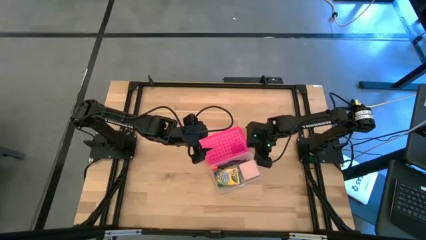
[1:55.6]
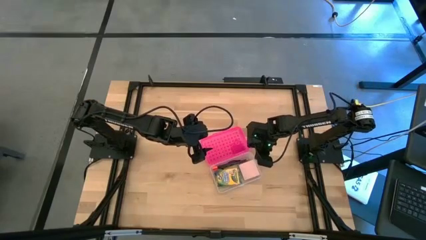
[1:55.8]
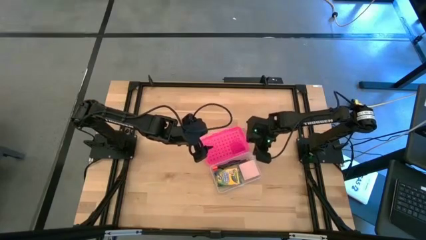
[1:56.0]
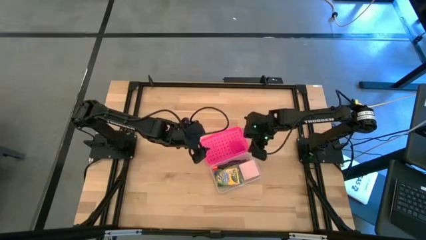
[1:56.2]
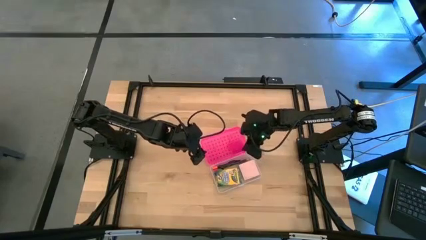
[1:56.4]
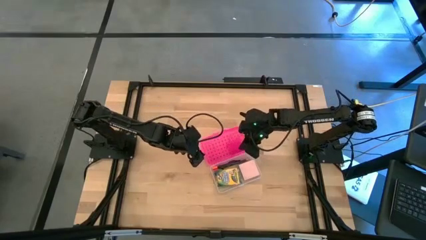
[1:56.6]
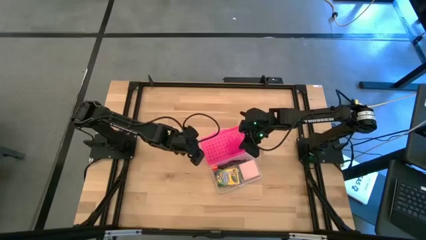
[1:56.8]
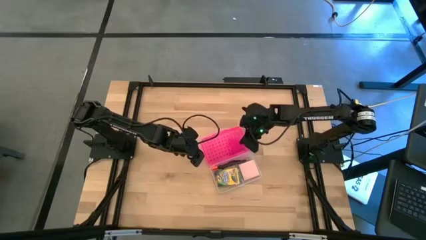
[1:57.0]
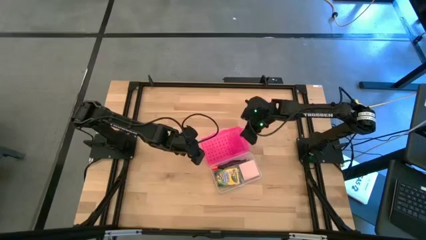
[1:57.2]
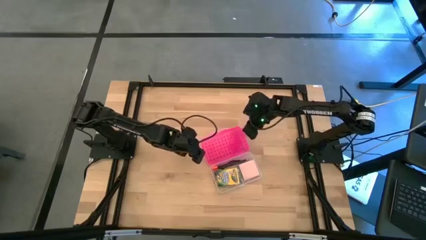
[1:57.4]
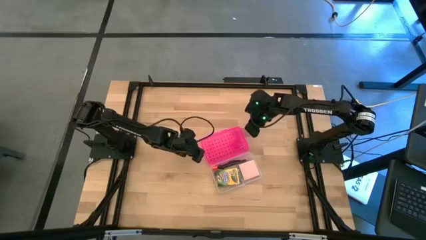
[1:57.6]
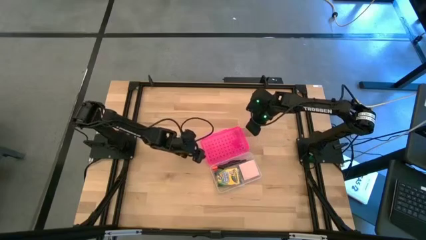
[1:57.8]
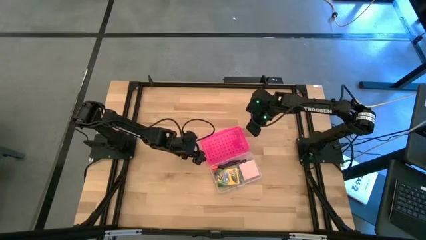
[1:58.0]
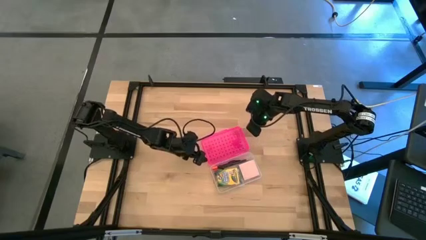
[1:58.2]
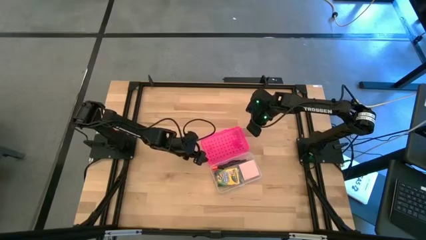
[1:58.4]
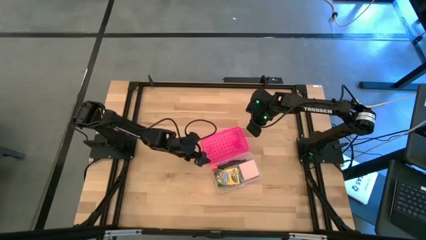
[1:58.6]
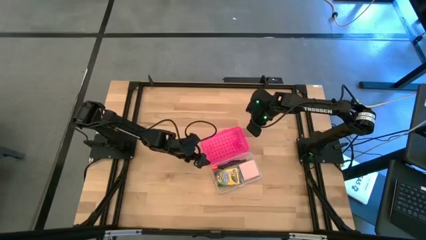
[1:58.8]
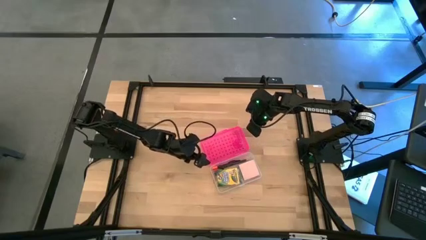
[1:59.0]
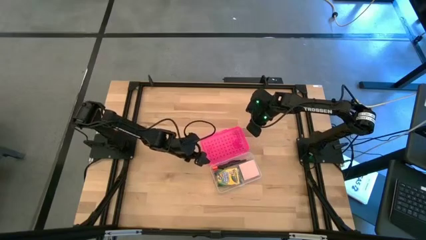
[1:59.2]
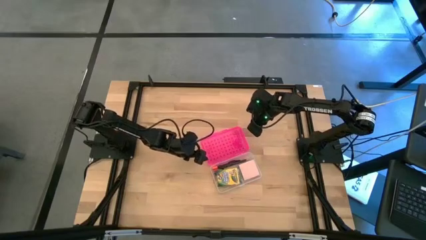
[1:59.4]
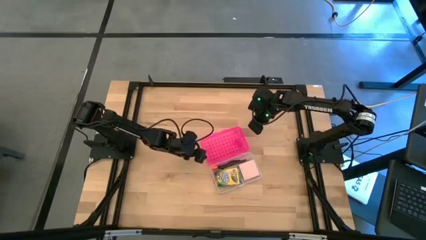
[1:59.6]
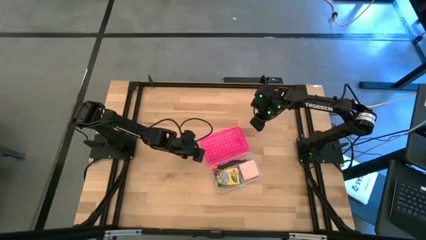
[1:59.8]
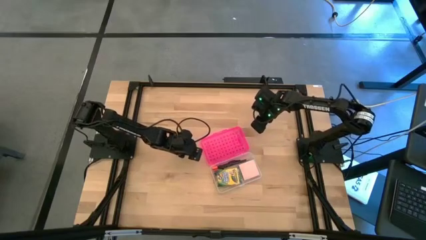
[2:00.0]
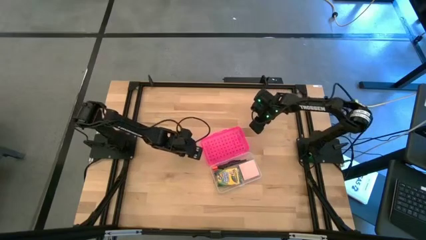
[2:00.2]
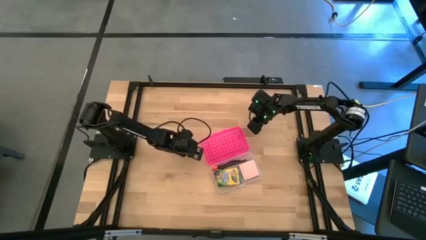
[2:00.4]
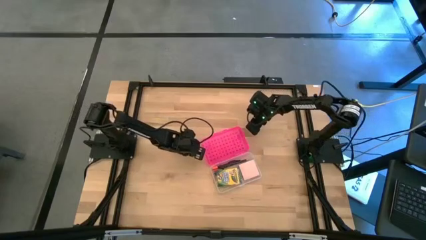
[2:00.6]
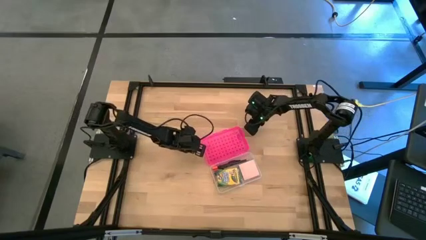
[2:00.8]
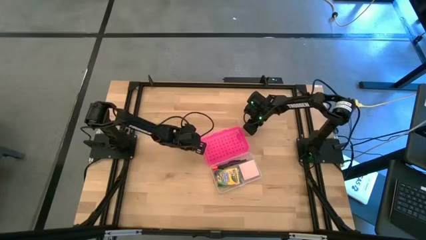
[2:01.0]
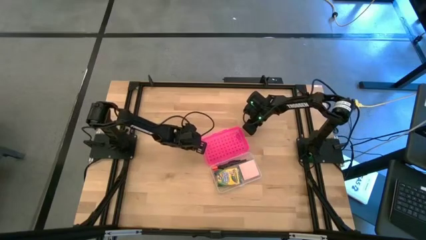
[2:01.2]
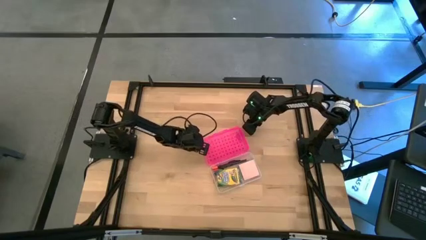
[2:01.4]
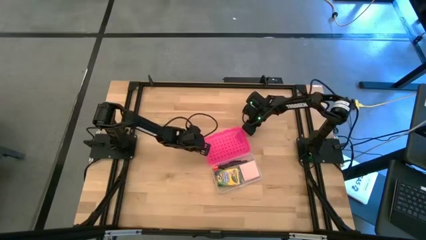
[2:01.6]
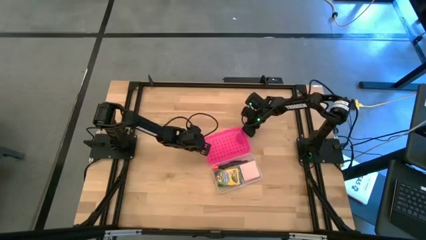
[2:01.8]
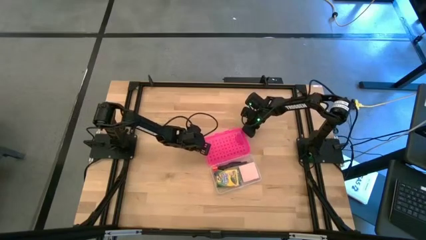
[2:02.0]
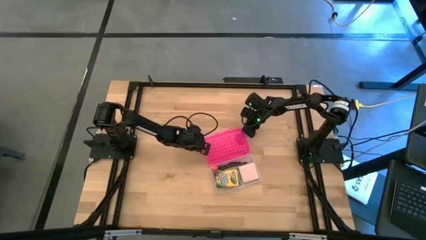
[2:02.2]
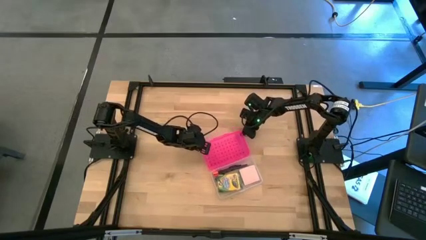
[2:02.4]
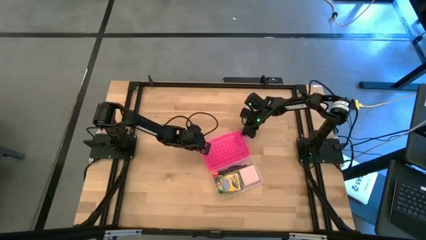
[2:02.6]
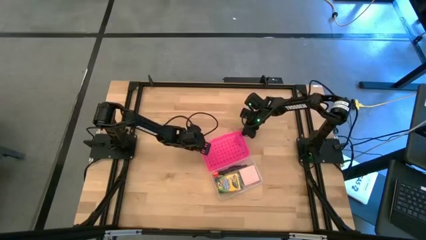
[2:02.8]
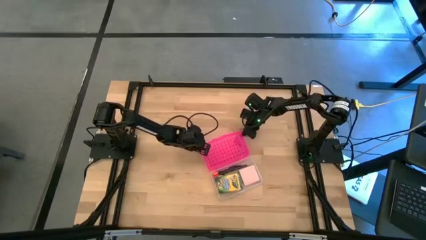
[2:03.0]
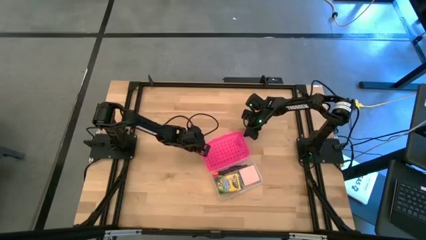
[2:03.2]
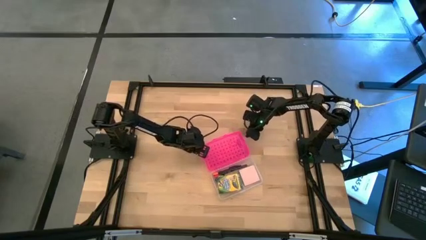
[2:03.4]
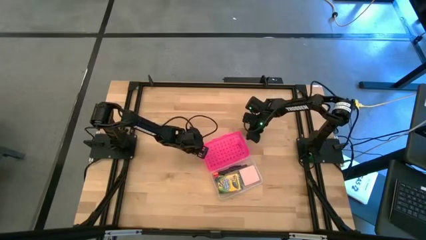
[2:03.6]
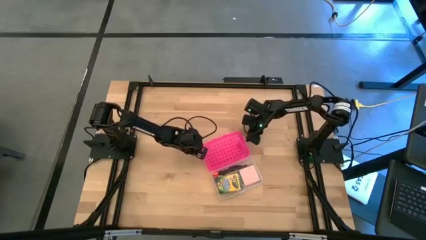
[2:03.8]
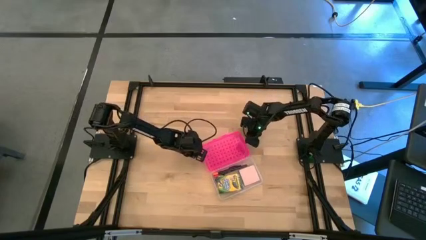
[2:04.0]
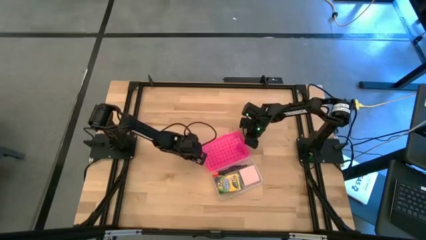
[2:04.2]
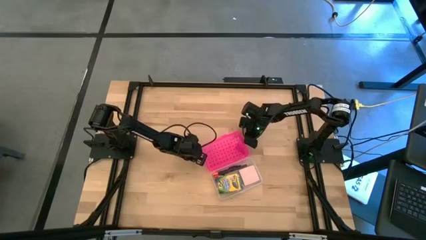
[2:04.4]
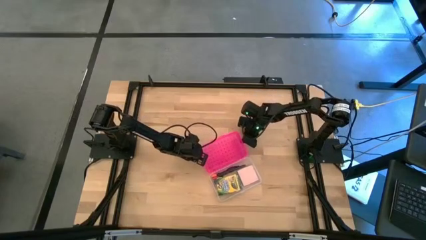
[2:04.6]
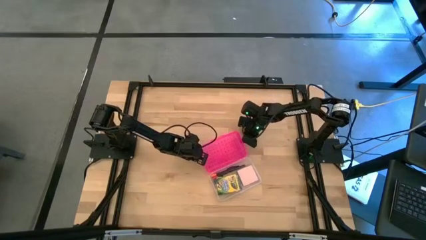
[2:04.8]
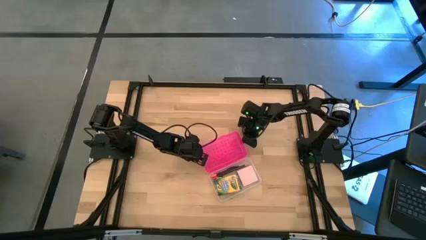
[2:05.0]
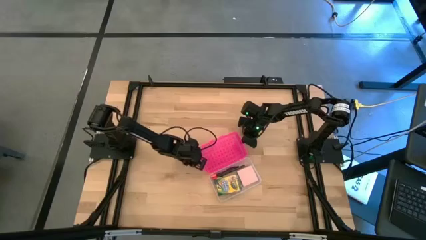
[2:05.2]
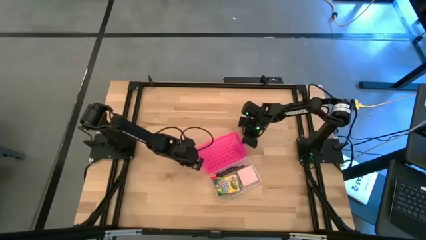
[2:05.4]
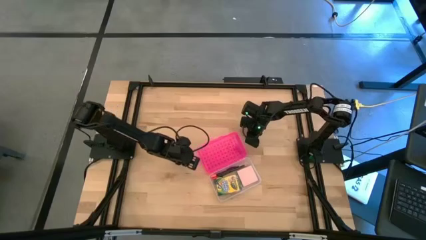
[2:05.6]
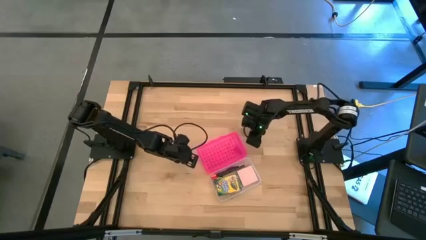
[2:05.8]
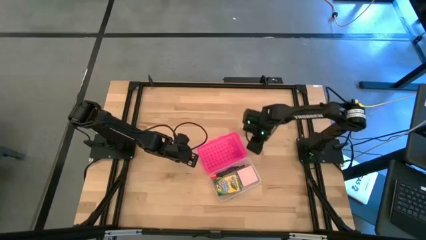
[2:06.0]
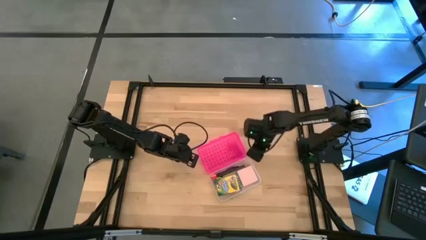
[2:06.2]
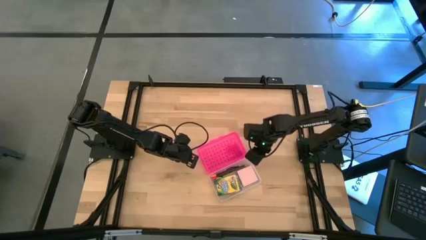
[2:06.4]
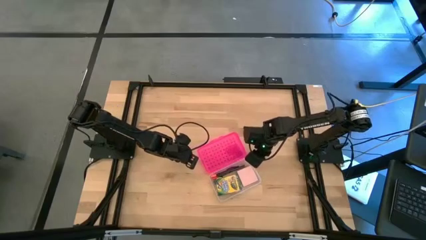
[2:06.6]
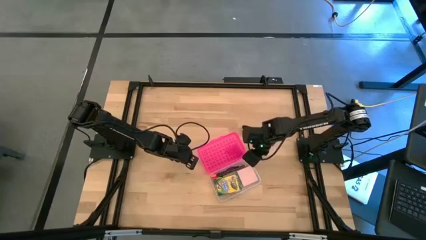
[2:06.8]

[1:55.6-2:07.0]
Task: Pack school essentials
Close the pink box

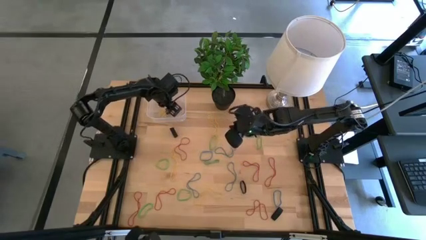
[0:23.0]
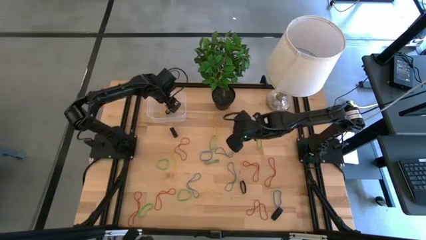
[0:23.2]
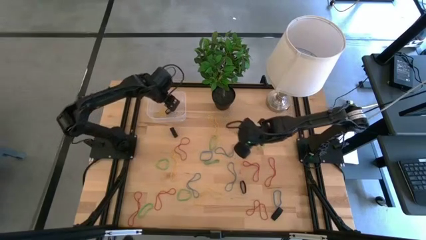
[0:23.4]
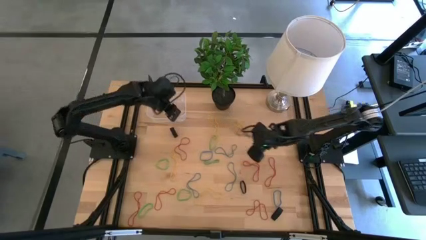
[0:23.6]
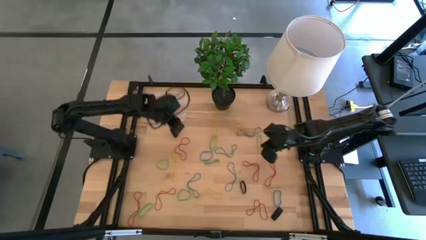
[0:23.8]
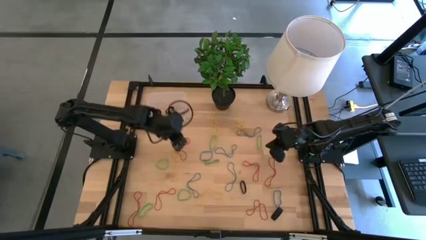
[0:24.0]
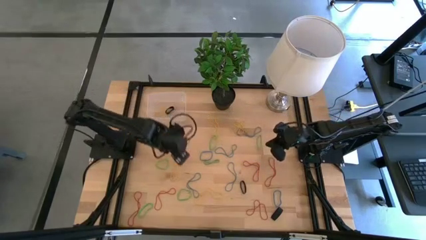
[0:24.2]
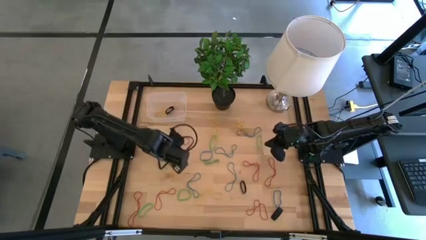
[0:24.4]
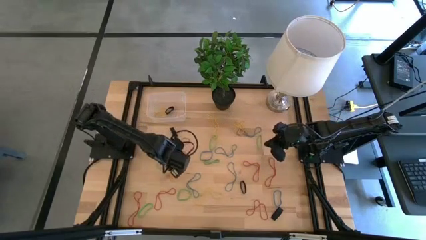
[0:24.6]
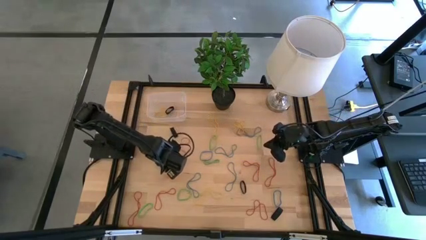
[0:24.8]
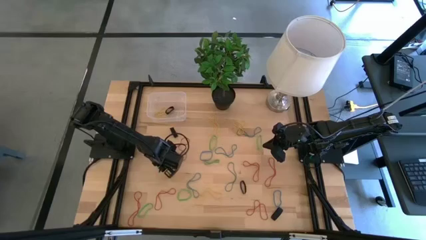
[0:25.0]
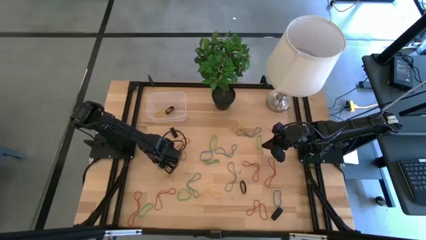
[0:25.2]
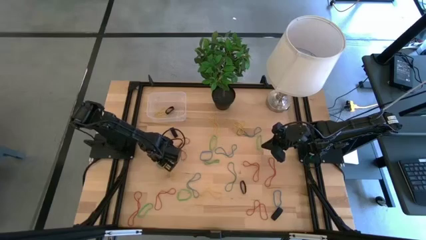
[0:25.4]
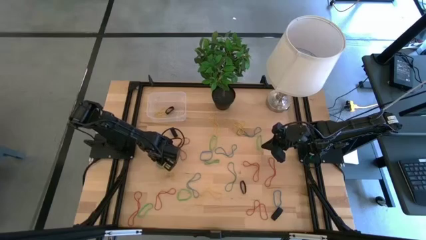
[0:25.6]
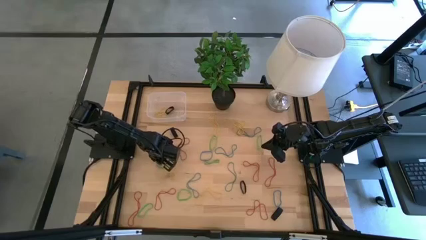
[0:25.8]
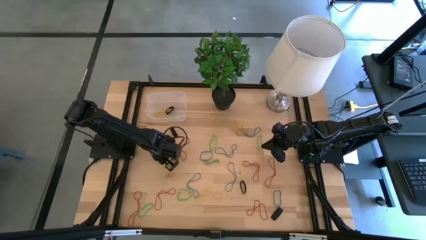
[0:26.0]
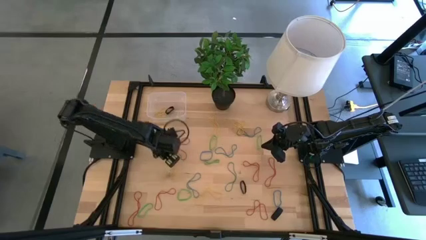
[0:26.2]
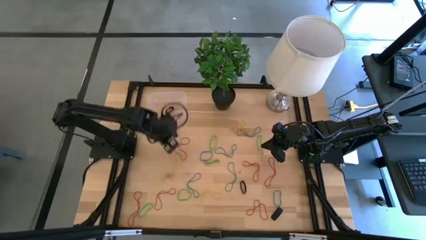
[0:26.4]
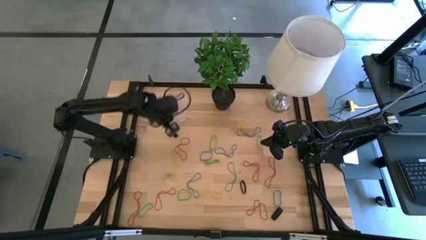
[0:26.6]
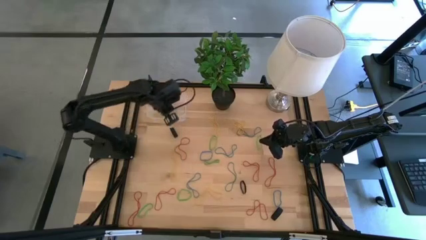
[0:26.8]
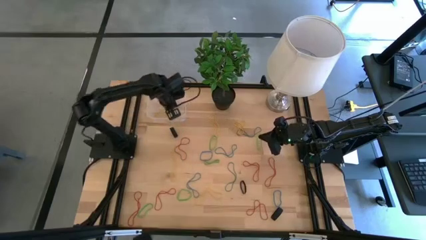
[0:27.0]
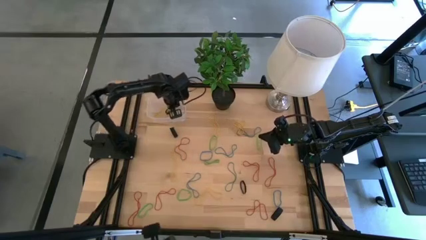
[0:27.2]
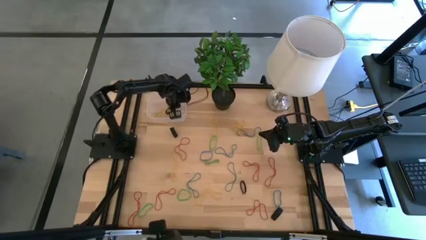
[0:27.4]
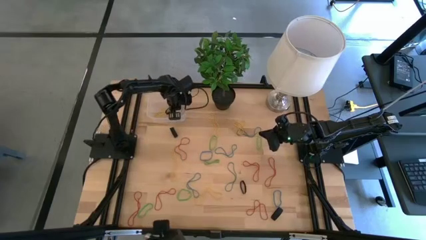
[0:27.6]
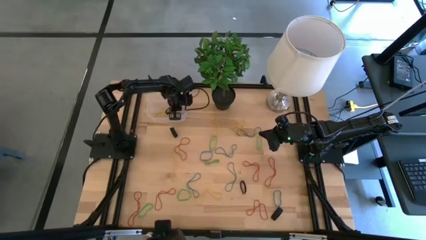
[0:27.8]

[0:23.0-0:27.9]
Task: Pick and place rubber bands into bin
Put the green rubber band into the transparent bin
